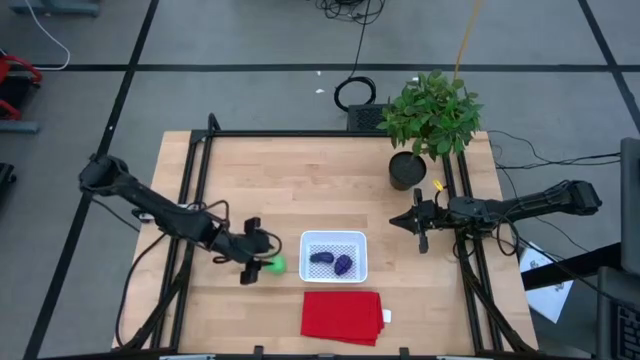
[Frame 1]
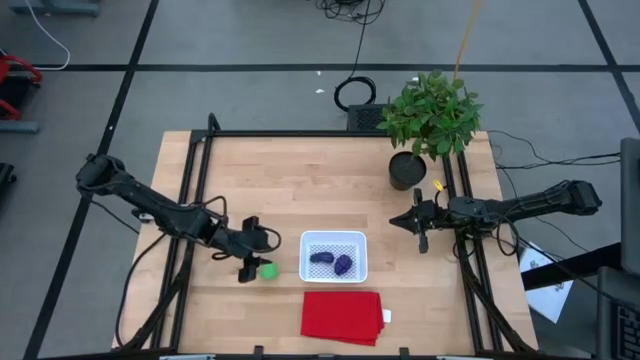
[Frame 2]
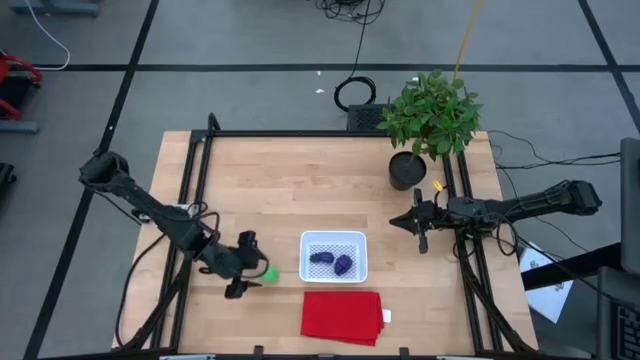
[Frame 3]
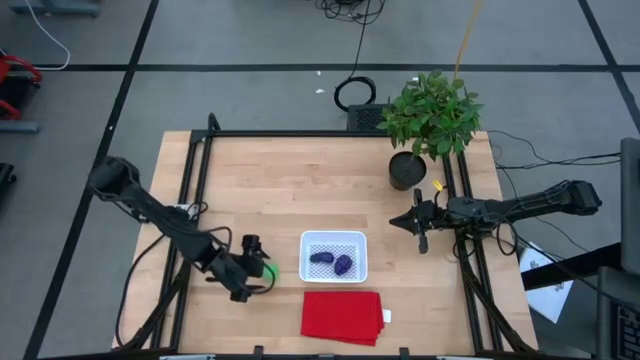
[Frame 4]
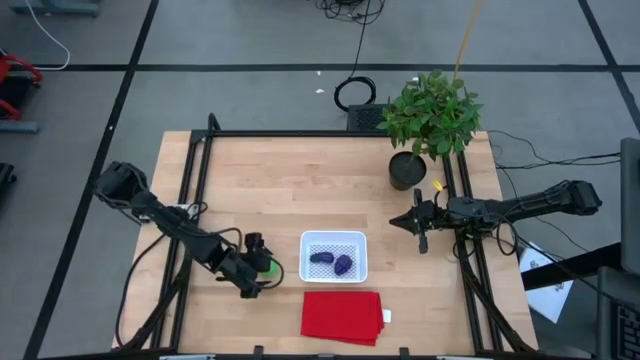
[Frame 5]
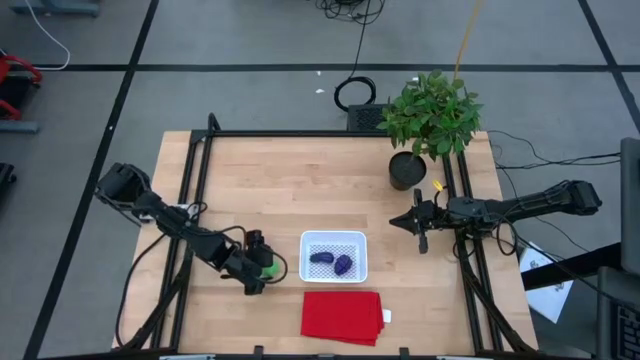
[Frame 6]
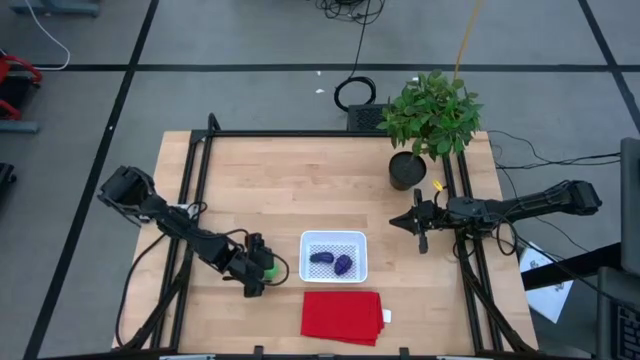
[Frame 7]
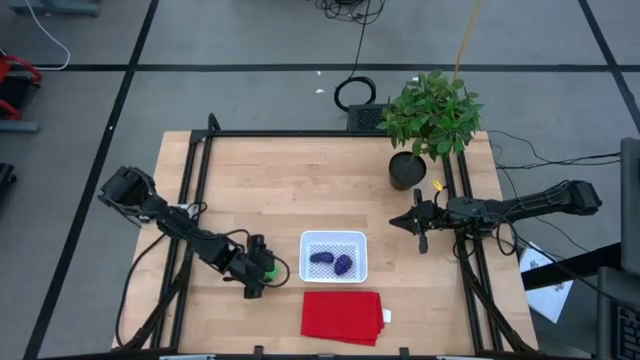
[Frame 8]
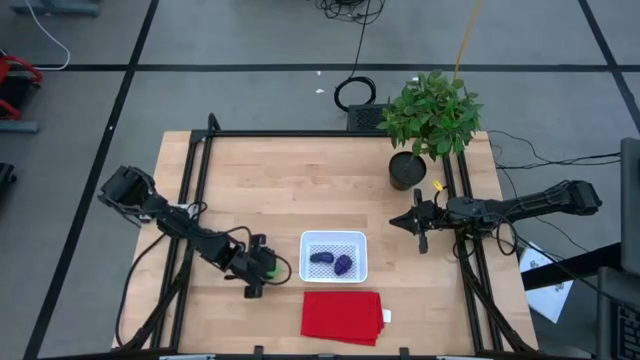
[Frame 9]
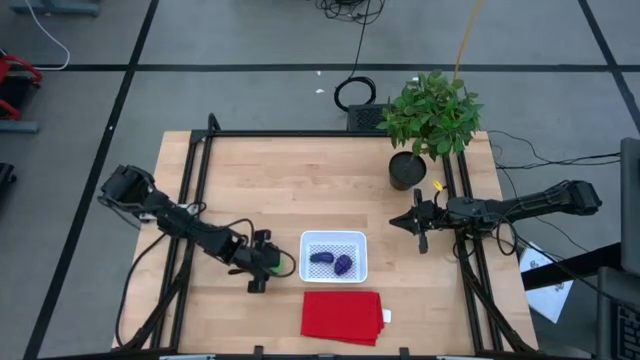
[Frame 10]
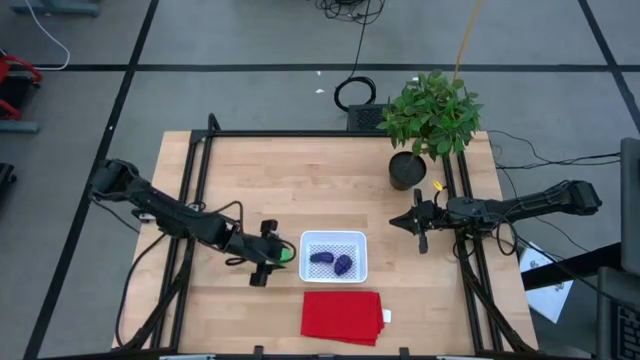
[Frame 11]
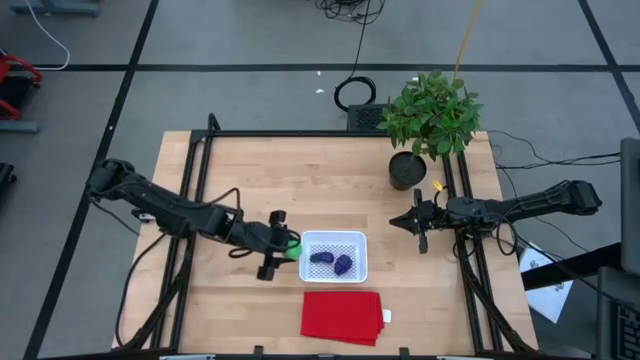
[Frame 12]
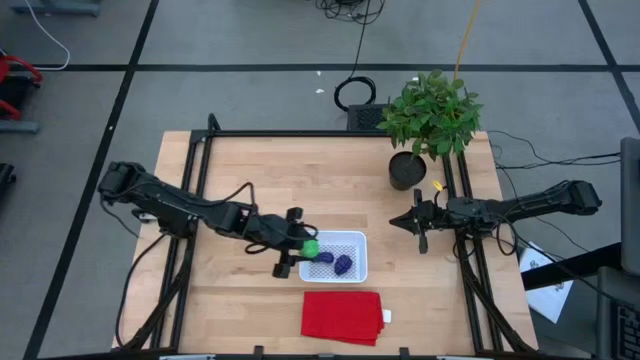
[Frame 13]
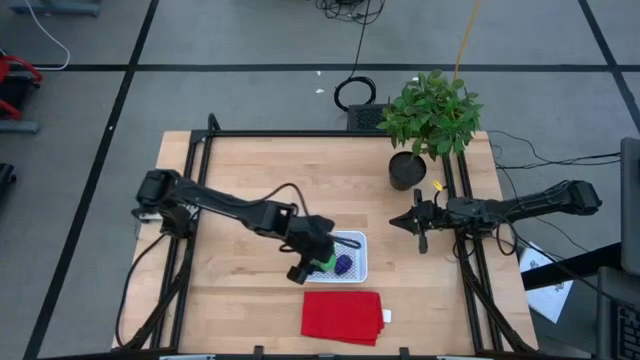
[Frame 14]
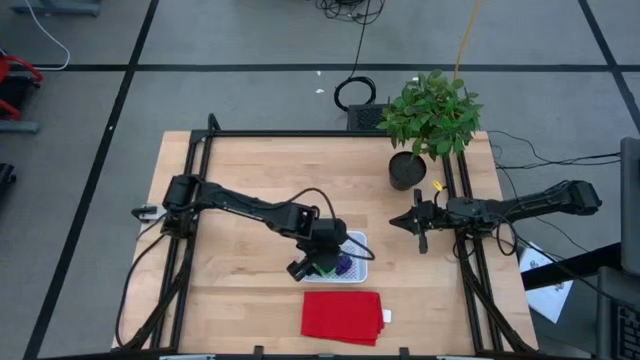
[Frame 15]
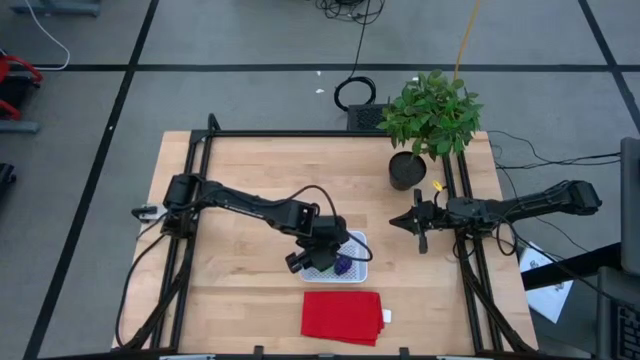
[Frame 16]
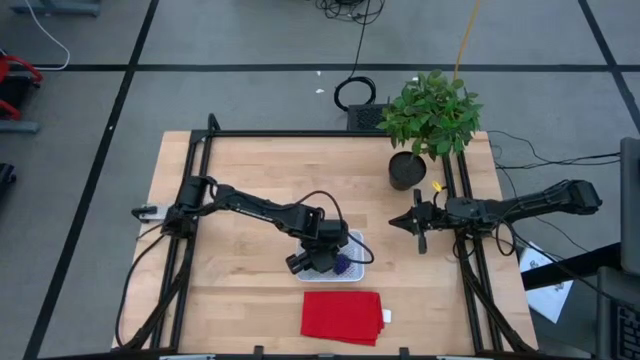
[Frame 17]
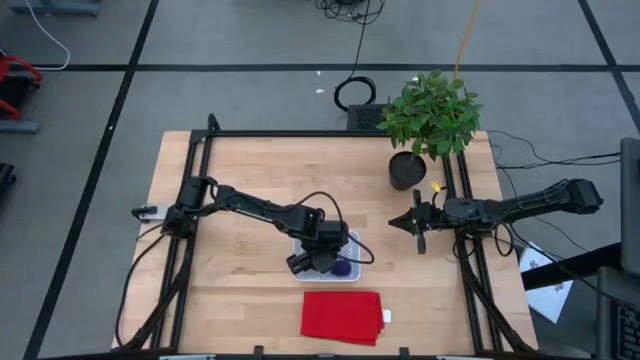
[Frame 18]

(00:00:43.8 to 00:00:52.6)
Task: Pick and placing Produce into tupperware
Put the green chayote into the white basket

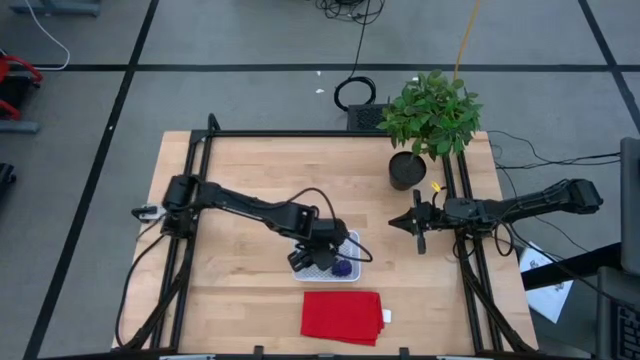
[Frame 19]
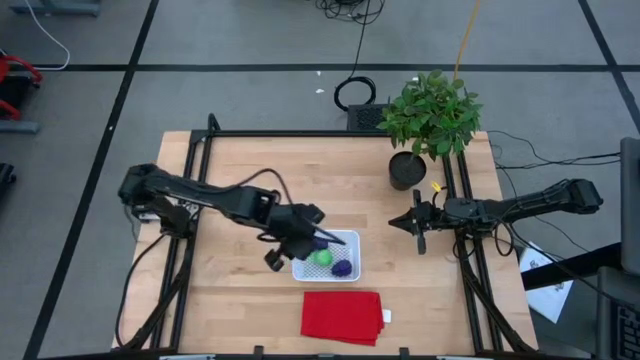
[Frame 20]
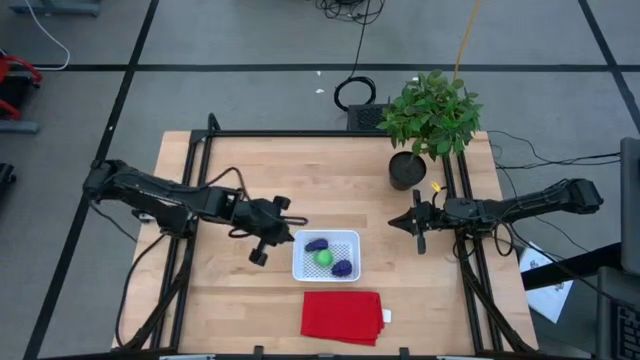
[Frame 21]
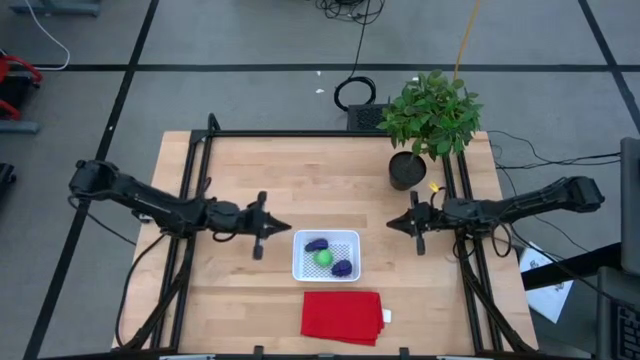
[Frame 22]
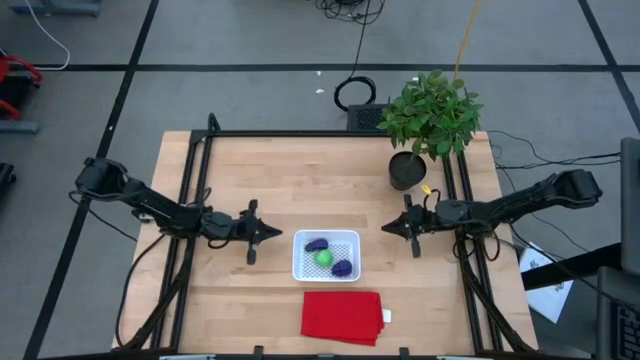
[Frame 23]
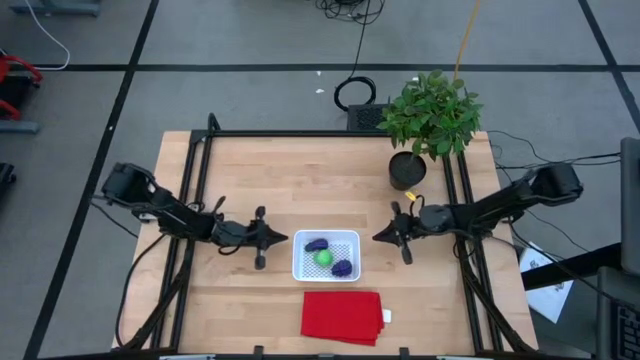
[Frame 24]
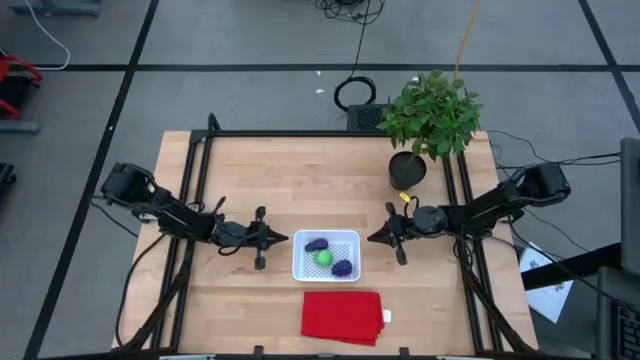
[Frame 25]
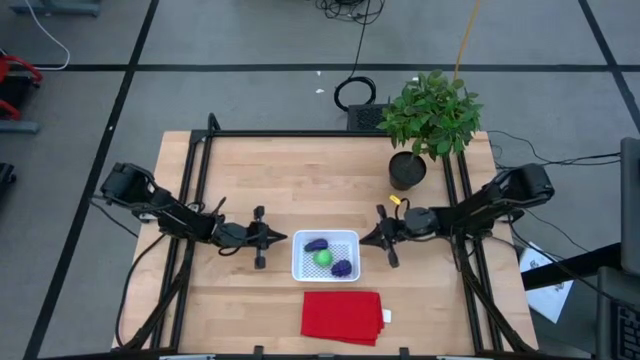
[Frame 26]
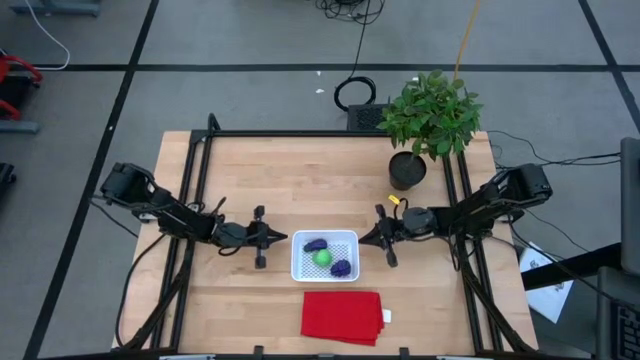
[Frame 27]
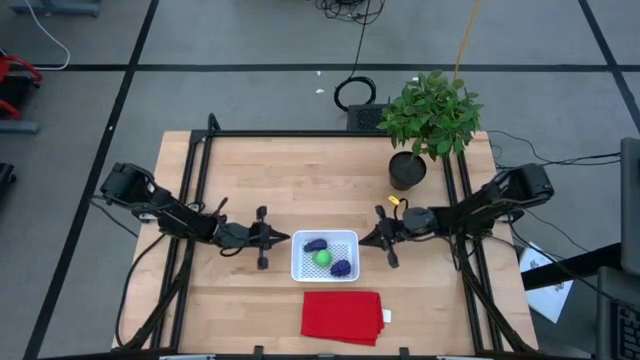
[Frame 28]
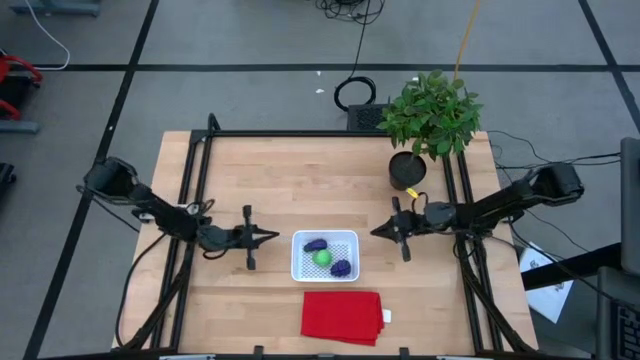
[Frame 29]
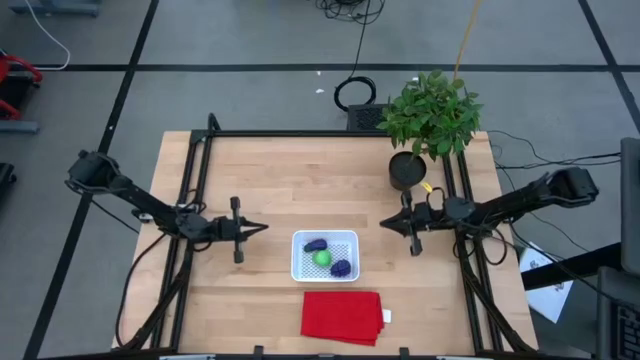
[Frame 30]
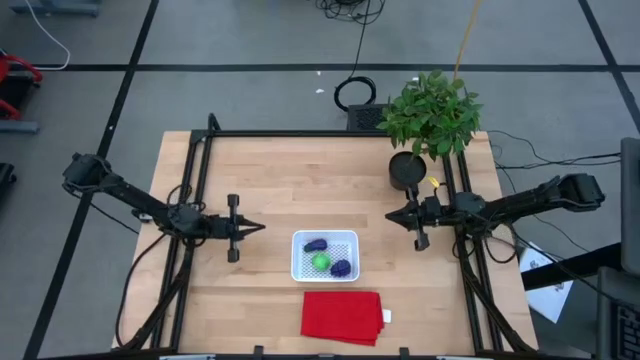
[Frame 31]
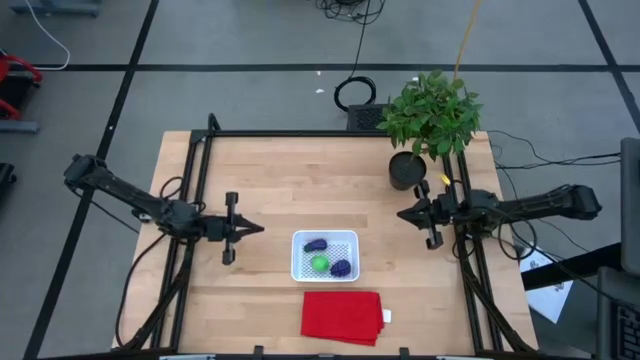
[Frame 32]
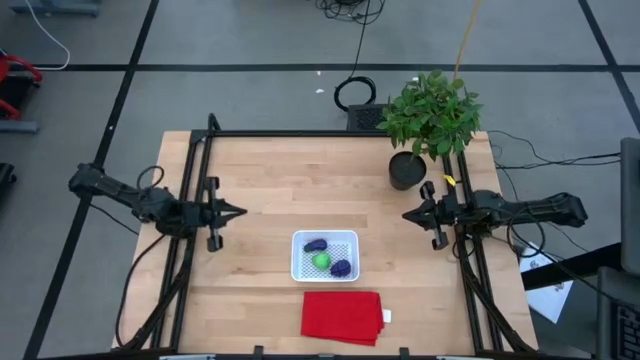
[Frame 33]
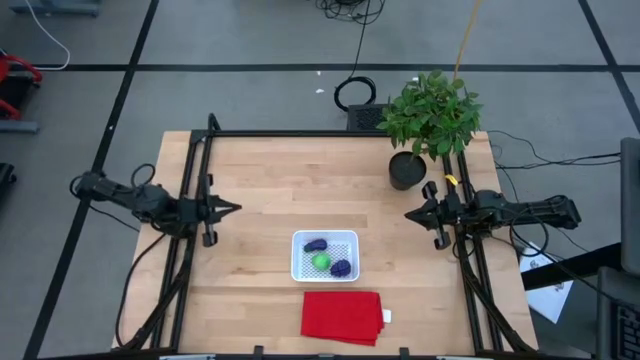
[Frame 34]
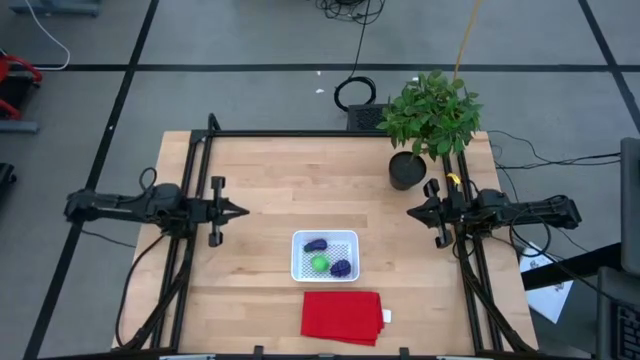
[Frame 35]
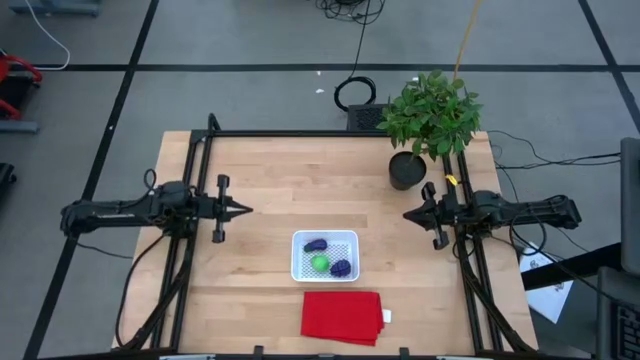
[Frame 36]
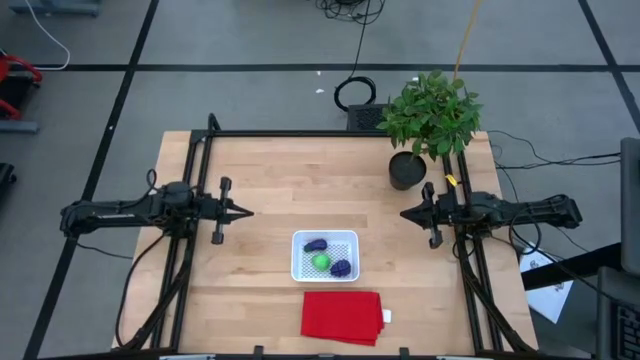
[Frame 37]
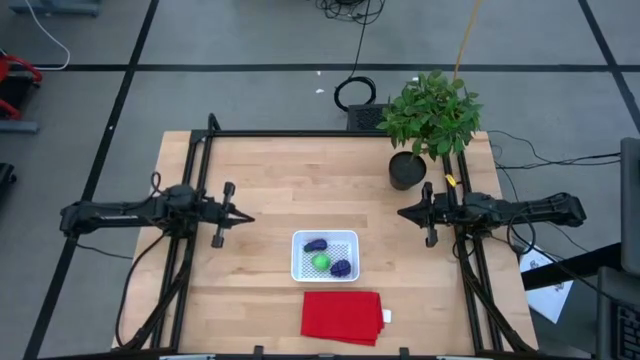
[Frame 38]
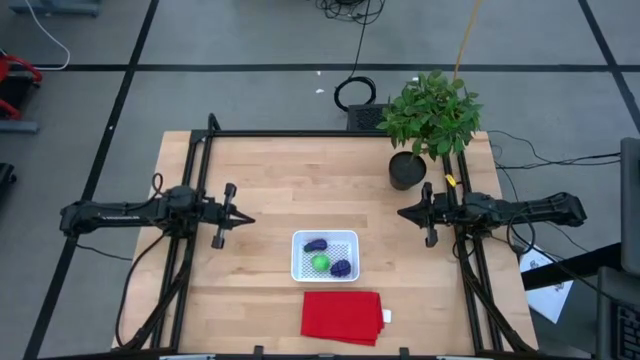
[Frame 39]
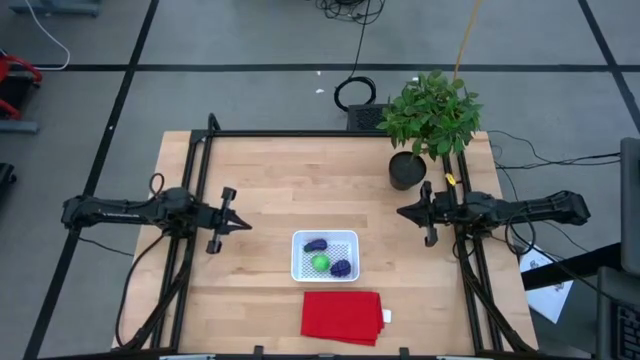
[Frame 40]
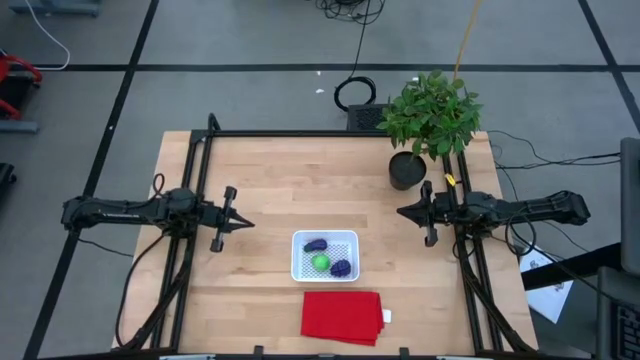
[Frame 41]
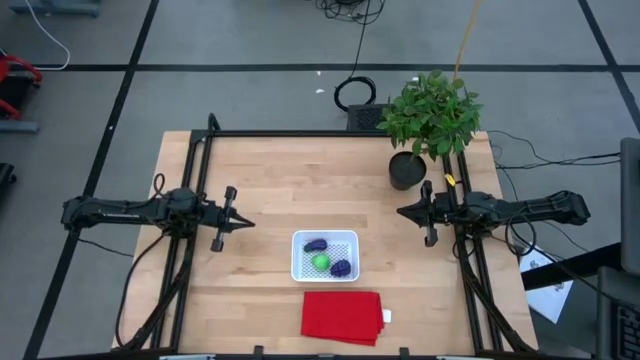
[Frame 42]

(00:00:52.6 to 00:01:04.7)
Return to Home Position
